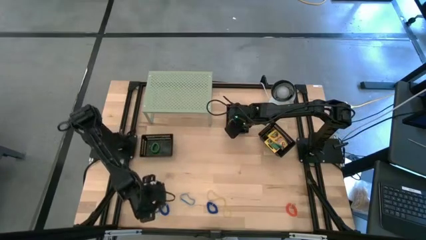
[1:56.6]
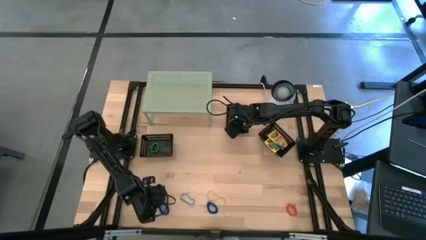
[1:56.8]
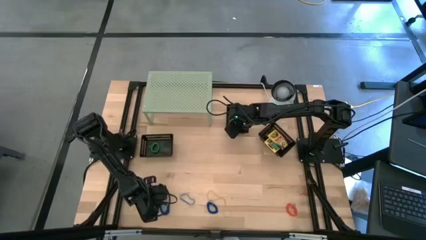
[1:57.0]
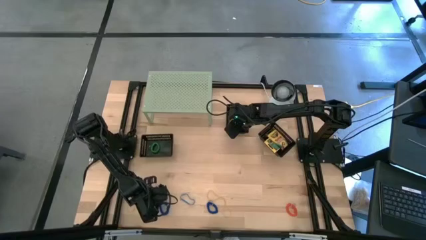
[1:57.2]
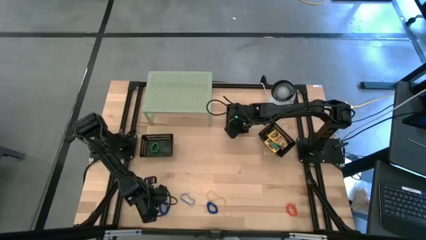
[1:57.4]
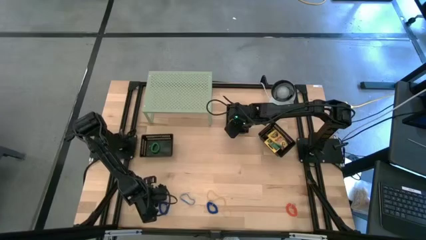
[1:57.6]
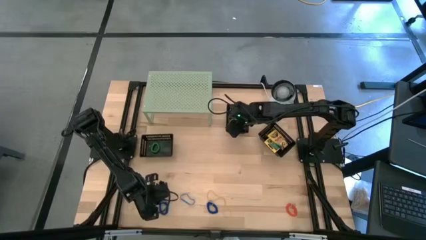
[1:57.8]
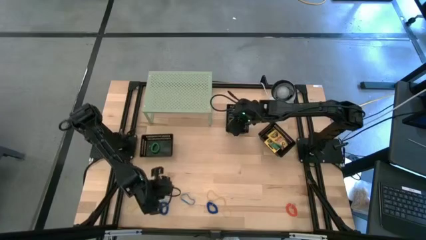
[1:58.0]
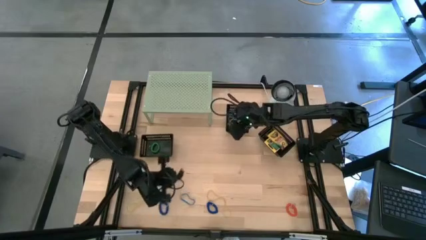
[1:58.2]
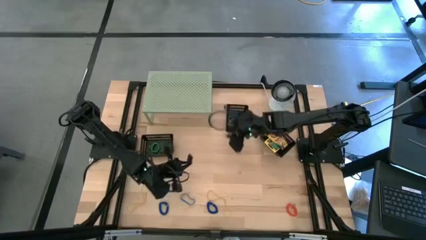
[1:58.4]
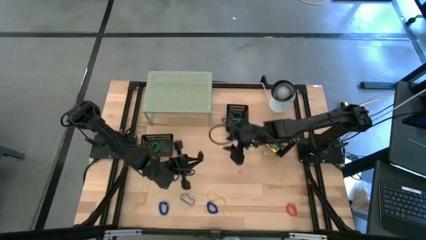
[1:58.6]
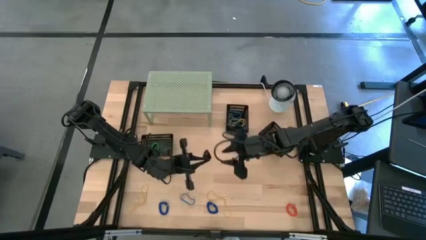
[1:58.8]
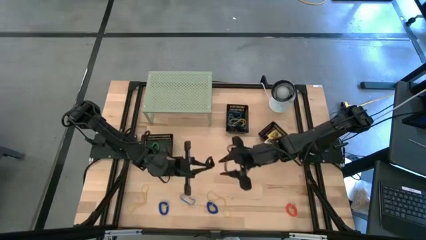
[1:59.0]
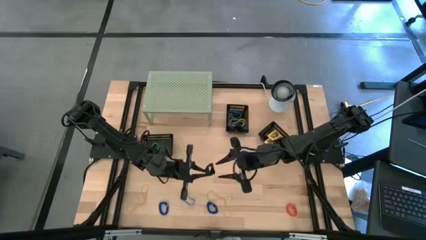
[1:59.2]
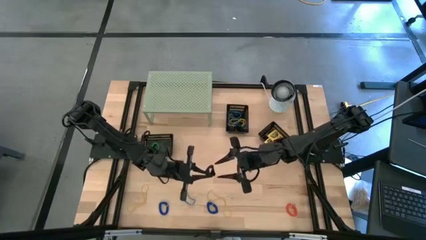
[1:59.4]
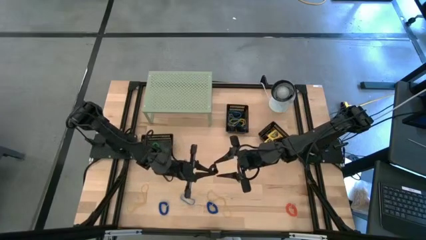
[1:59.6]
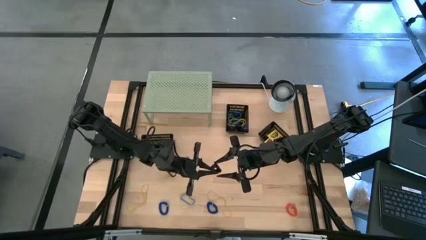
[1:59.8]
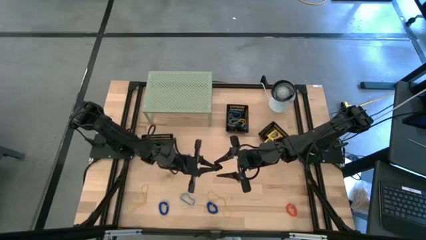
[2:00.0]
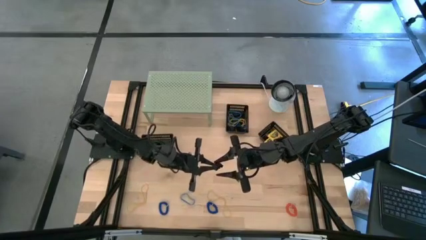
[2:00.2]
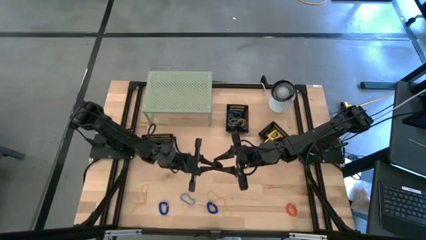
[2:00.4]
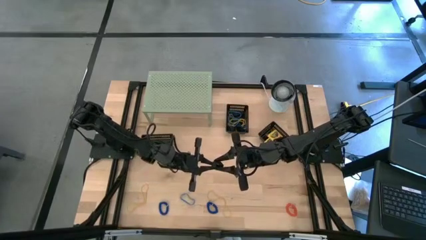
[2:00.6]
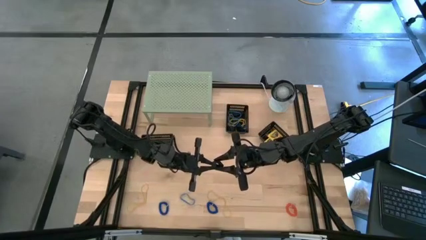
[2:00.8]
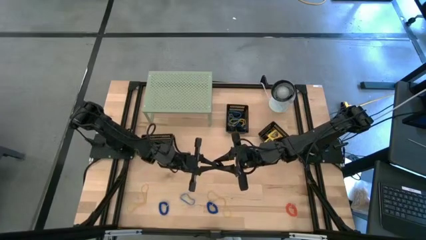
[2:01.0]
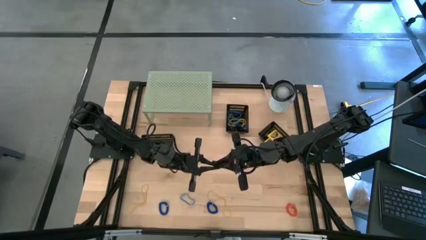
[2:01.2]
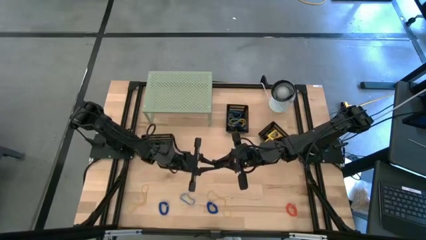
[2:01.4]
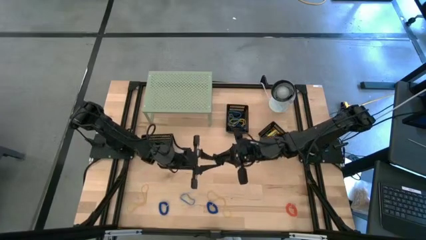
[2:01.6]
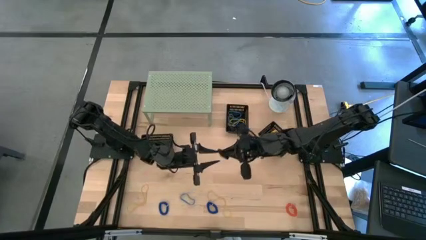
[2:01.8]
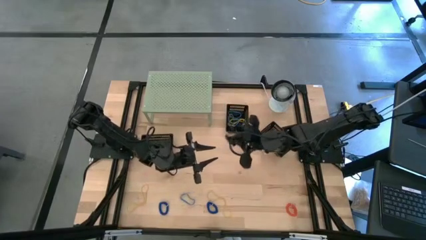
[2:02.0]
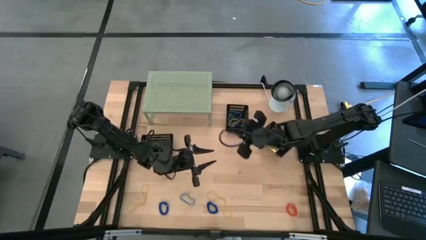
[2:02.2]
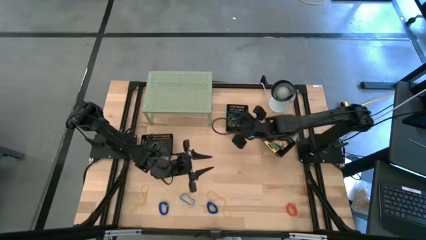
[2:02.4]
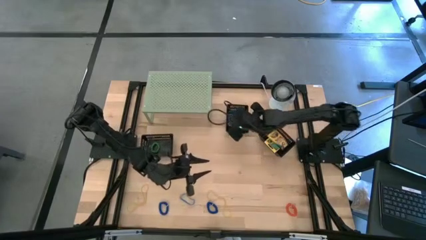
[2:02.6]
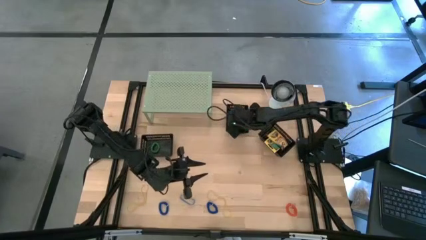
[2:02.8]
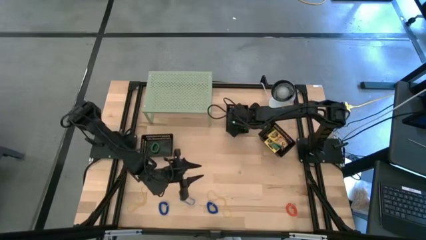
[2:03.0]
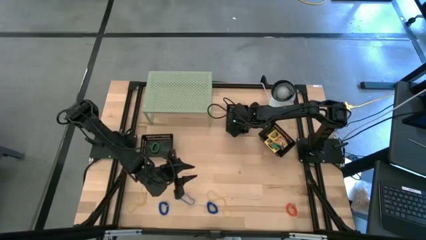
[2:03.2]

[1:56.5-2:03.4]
Task: Pick & Place Office Desk Supplies
Put the black rubber band into the top black bin

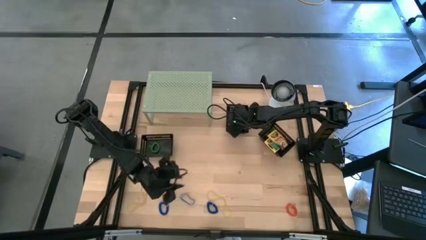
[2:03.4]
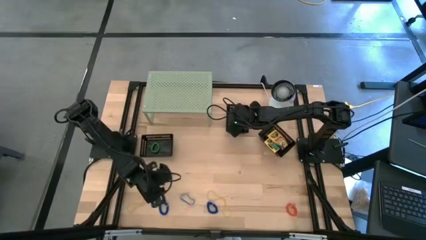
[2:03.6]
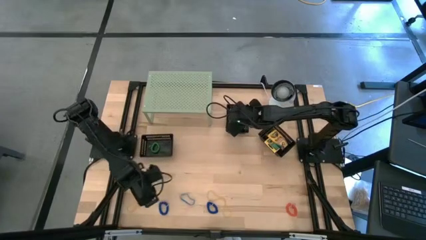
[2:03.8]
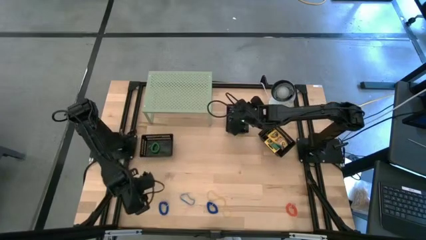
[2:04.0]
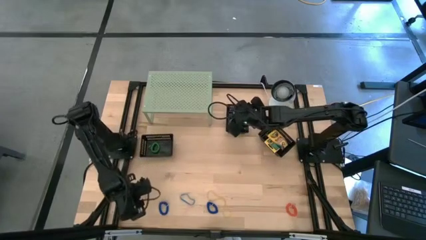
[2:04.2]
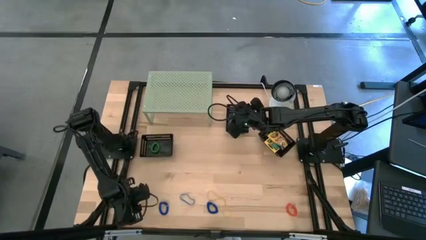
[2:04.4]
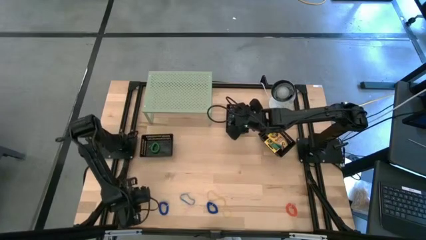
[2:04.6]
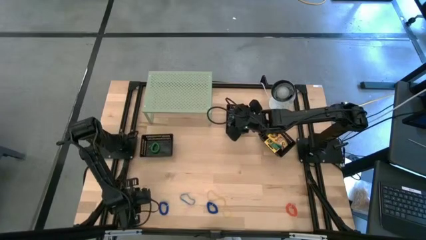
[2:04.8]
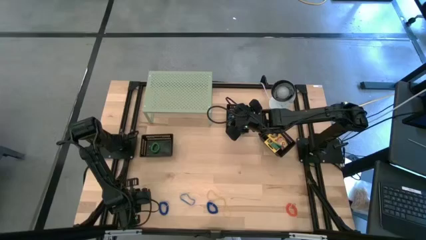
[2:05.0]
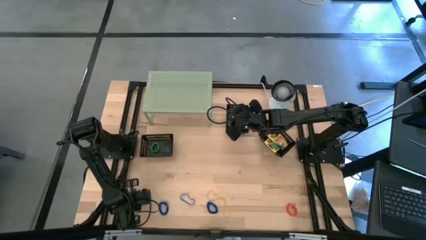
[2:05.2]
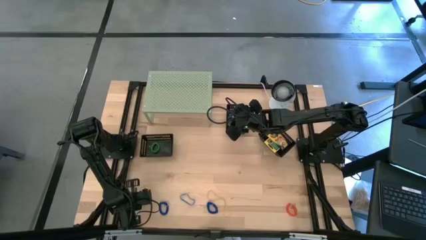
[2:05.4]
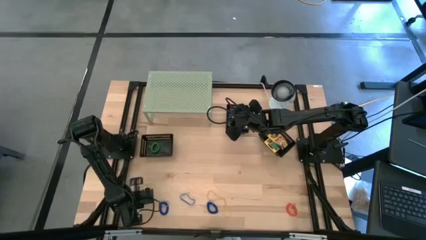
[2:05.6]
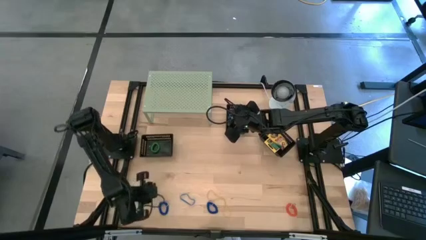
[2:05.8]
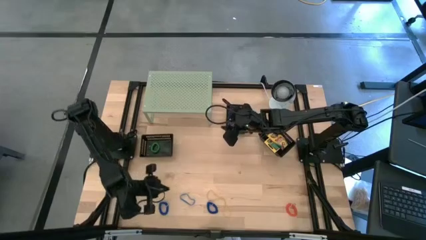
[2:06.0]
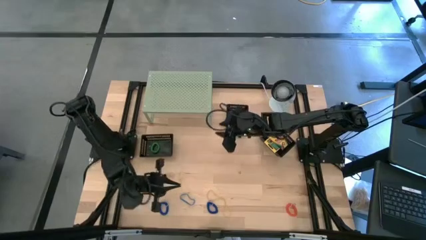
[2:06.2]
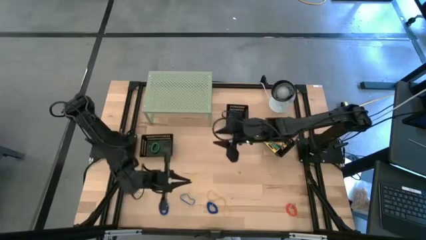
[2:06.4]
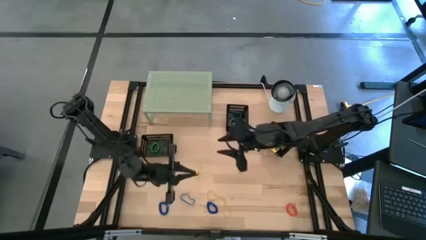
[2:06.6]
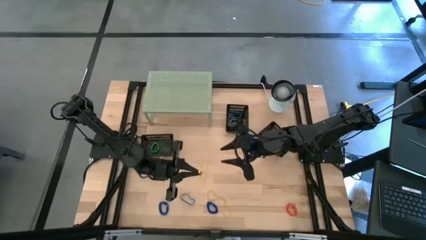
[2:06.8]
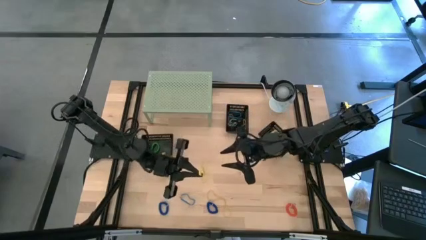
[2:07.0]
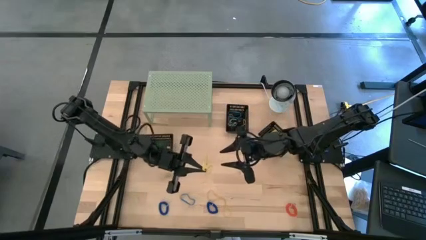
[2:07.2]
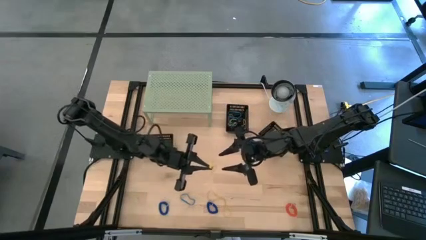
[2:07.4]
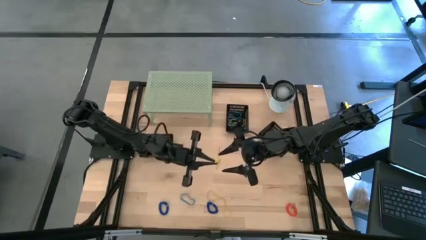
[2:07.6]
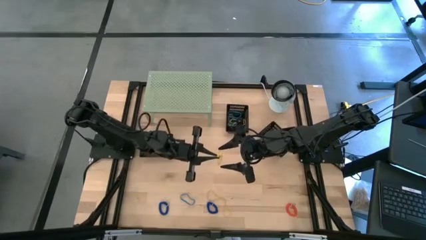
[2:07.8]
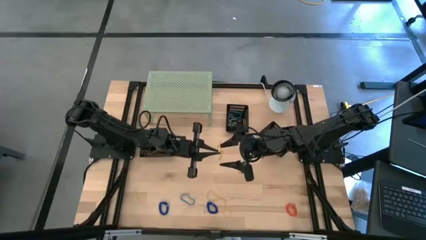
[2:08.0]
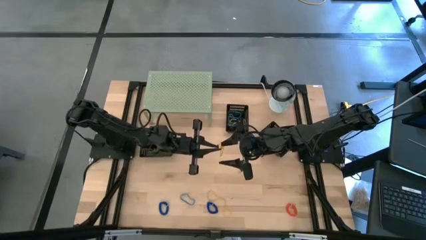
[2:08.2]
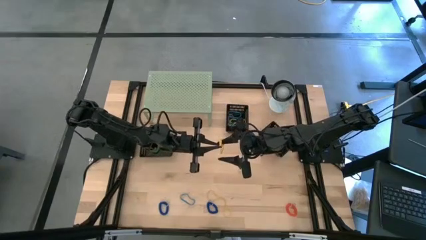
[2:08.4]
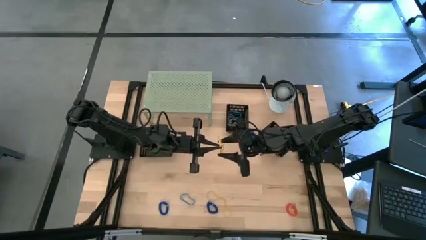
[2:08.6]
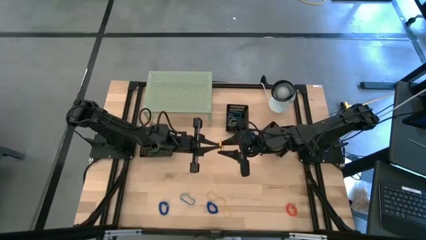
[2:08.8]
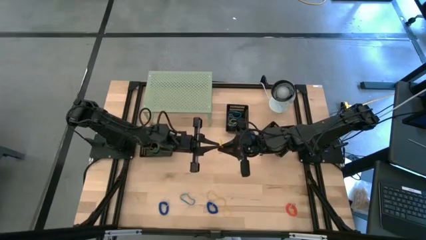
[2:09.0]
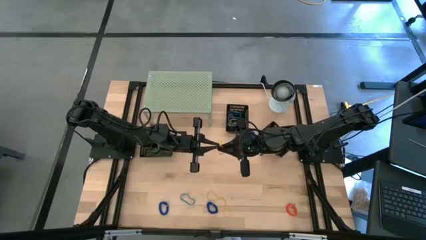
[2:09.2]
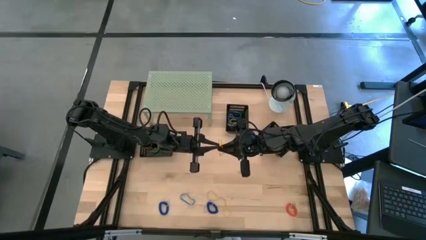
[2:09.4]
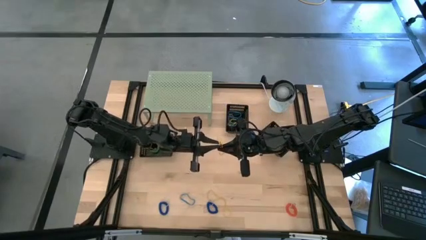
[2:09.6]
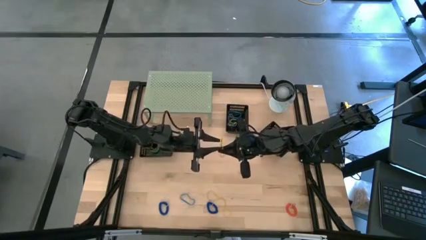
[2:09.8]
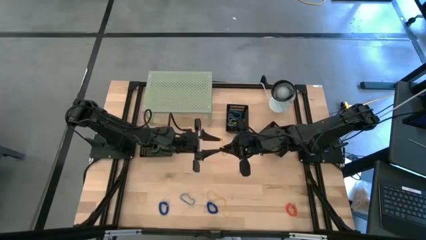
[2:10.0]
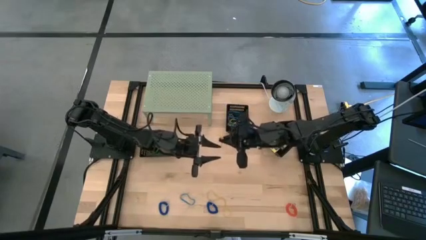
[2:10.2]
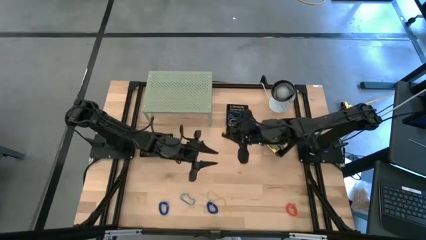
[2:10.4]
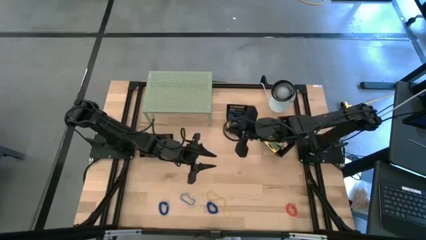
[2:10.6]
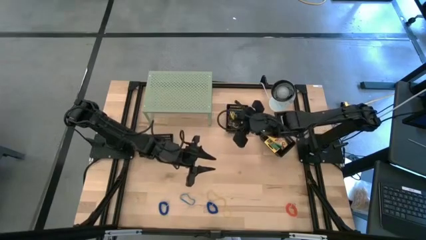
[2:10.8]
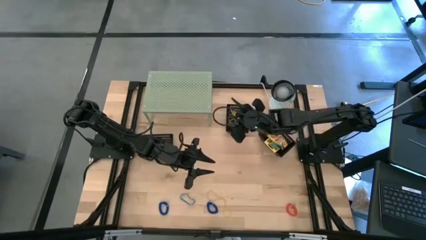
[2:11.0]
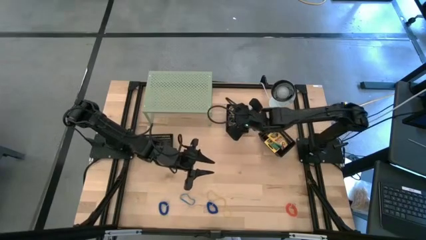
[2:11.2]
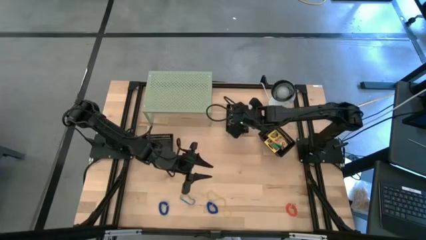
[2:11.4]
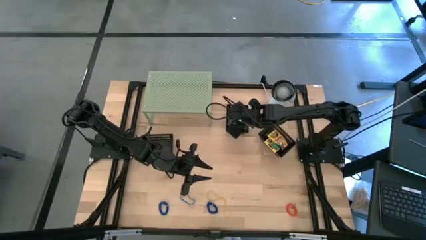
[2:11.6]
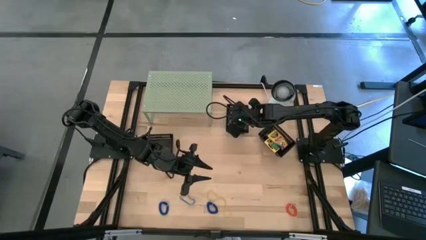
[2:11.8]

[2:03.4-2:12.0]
Put the yellow rubber band into the top black bin
